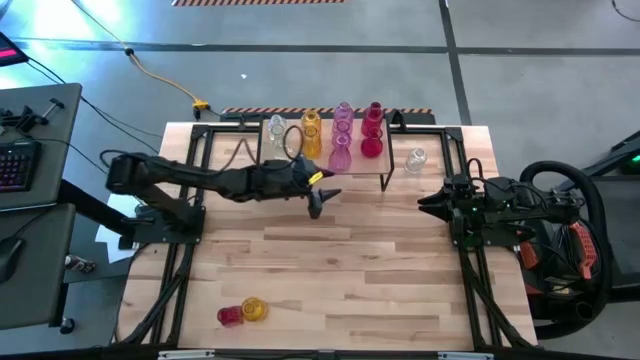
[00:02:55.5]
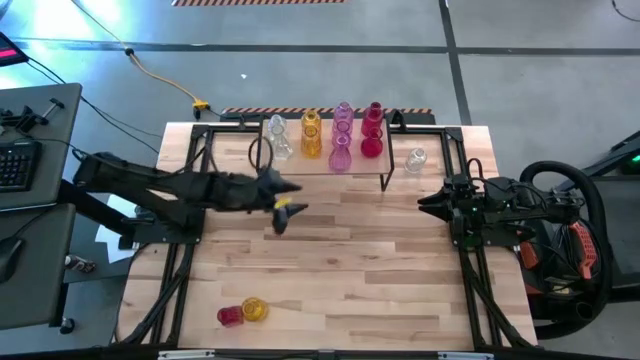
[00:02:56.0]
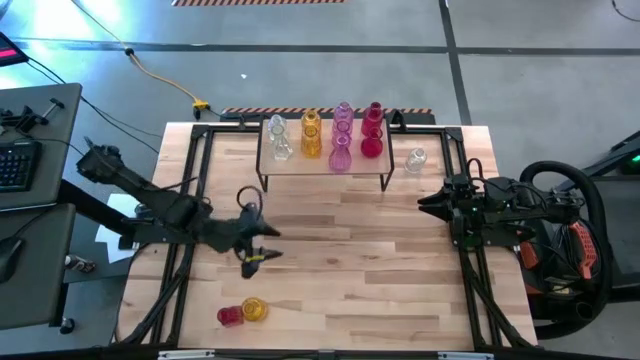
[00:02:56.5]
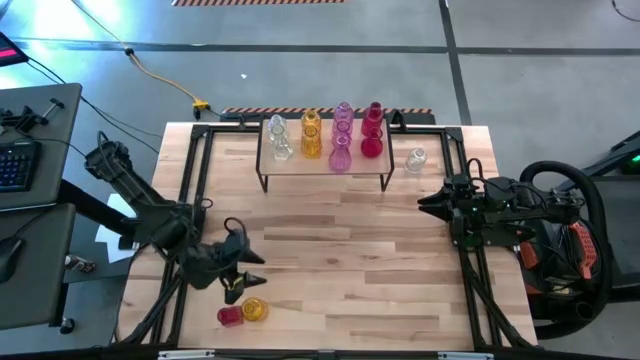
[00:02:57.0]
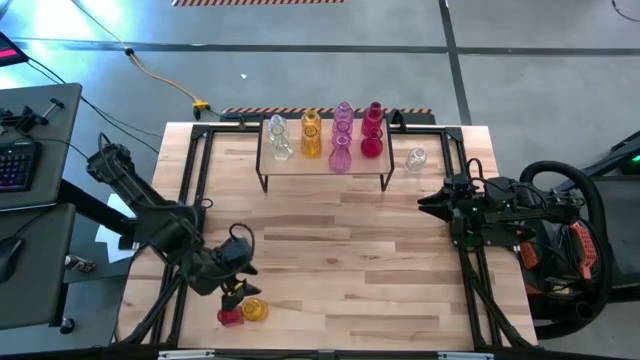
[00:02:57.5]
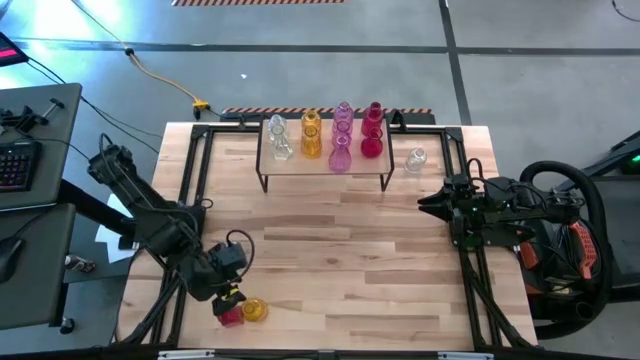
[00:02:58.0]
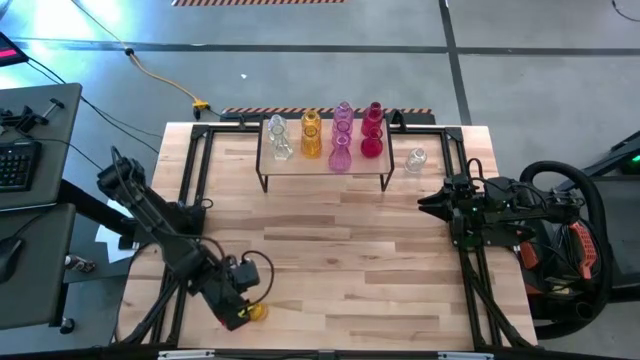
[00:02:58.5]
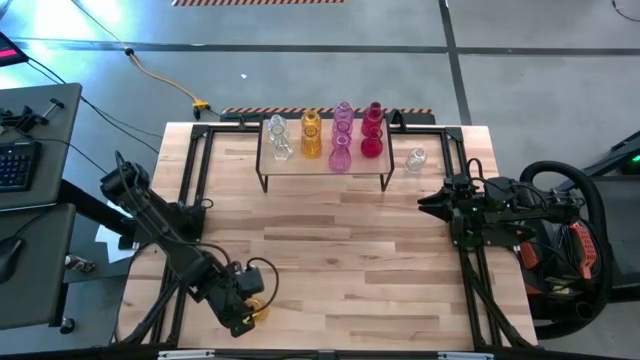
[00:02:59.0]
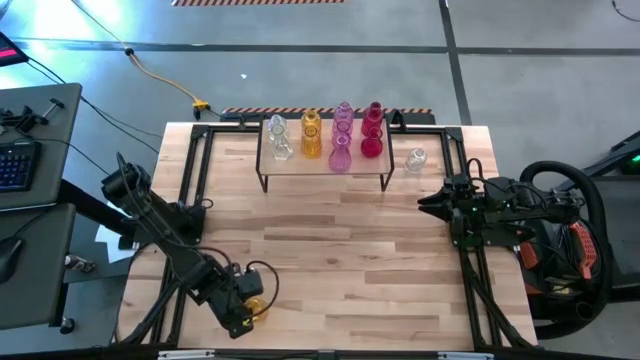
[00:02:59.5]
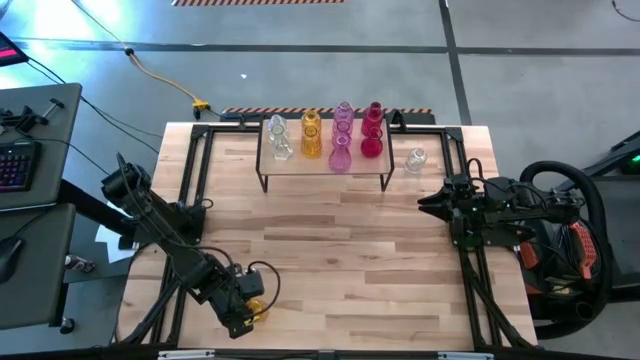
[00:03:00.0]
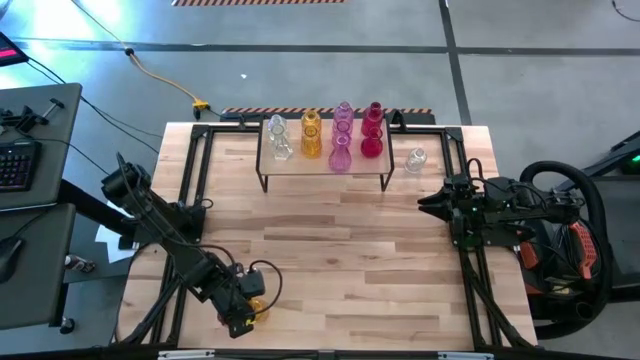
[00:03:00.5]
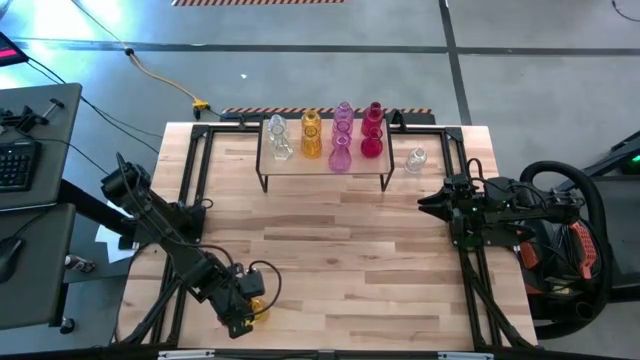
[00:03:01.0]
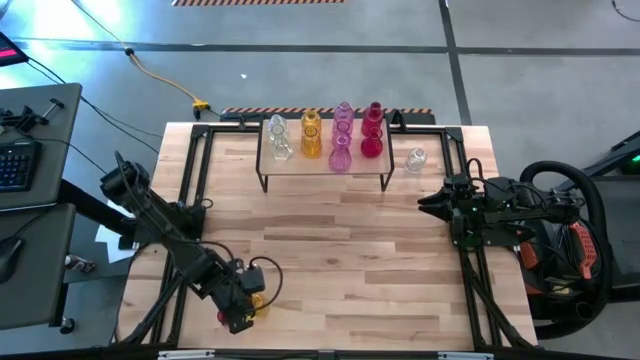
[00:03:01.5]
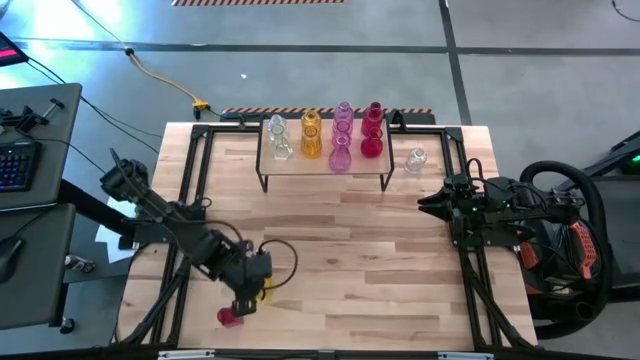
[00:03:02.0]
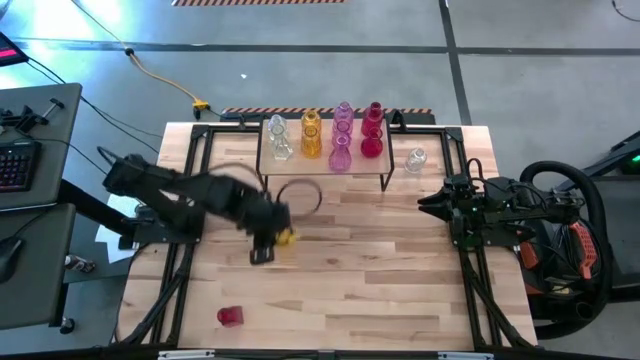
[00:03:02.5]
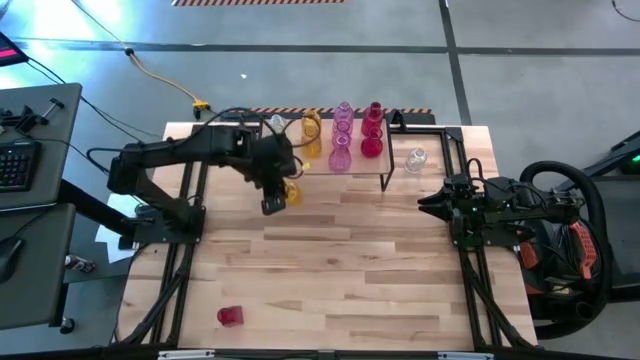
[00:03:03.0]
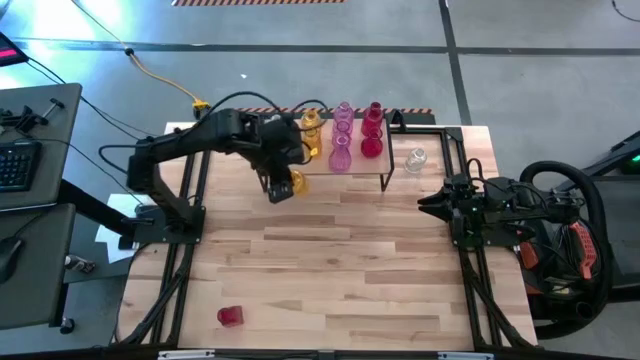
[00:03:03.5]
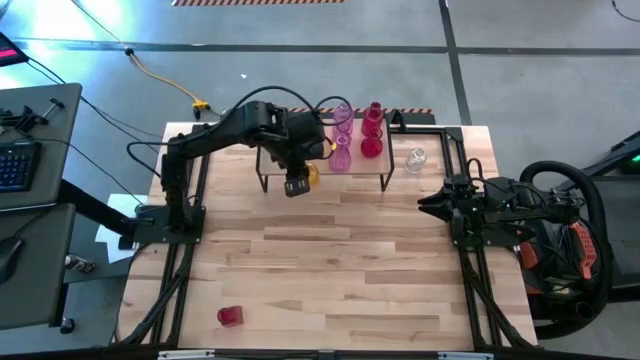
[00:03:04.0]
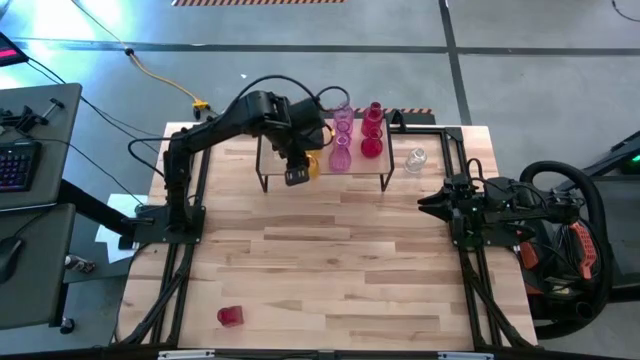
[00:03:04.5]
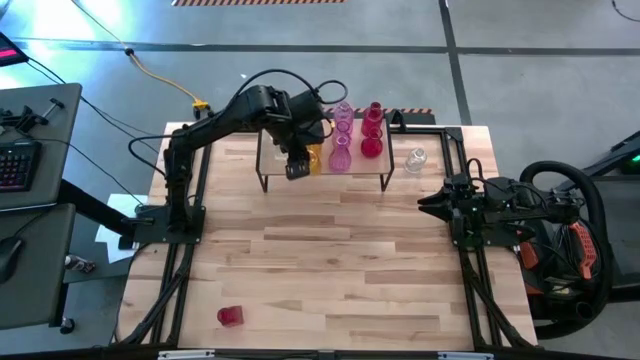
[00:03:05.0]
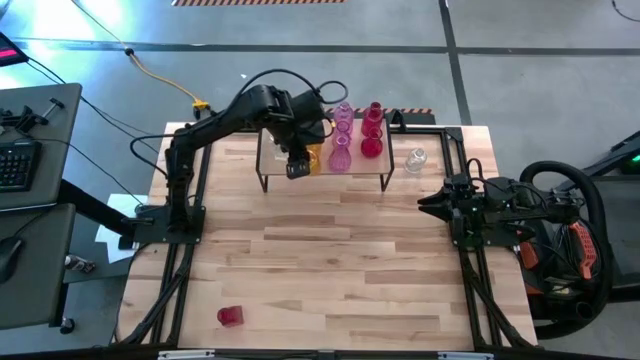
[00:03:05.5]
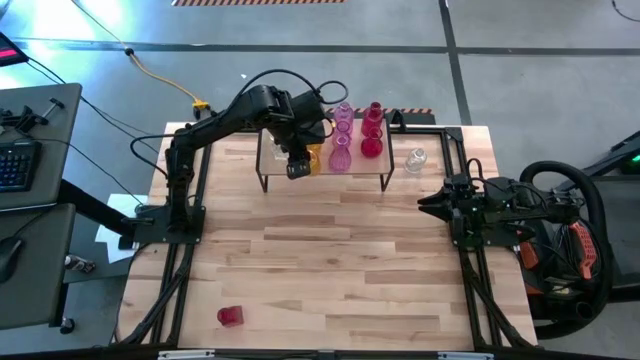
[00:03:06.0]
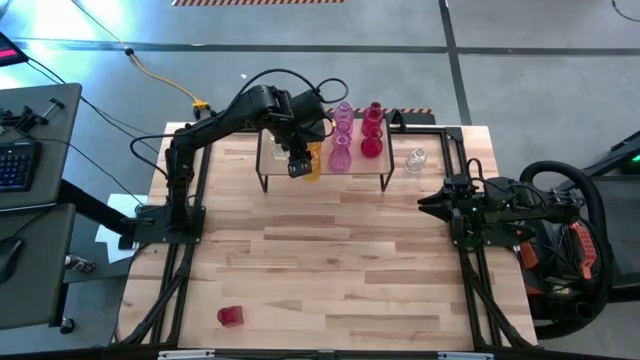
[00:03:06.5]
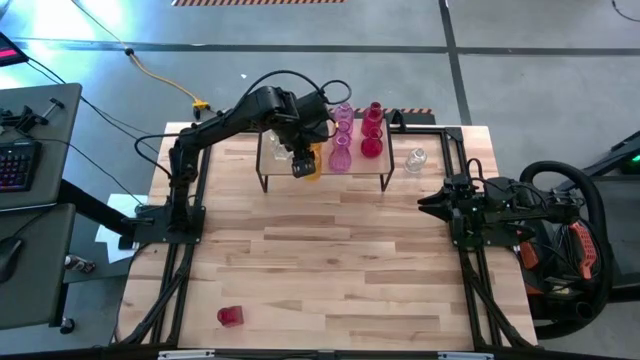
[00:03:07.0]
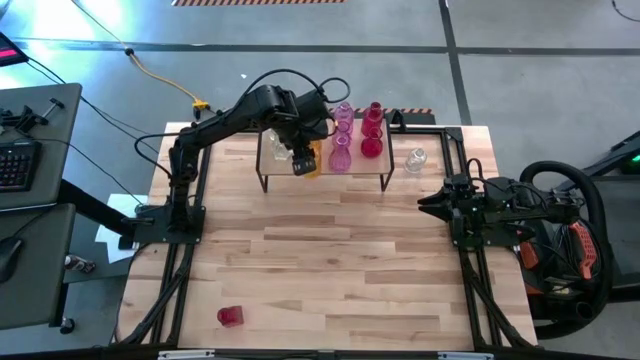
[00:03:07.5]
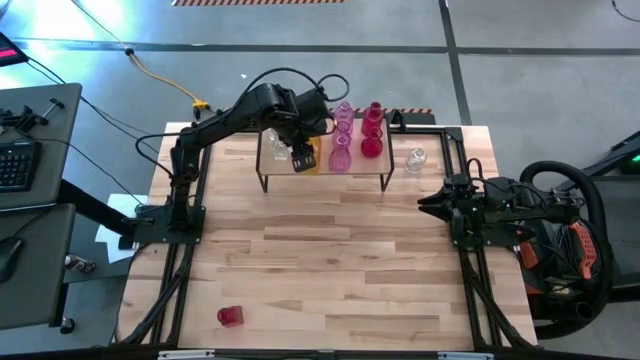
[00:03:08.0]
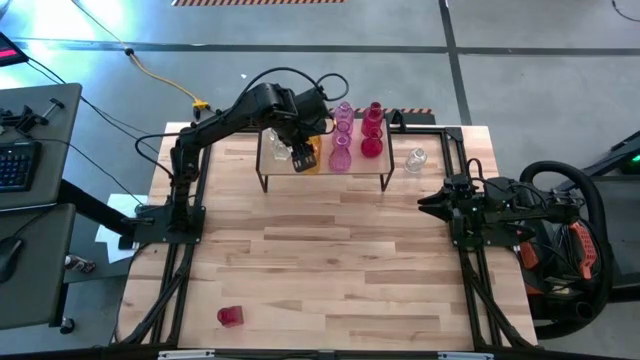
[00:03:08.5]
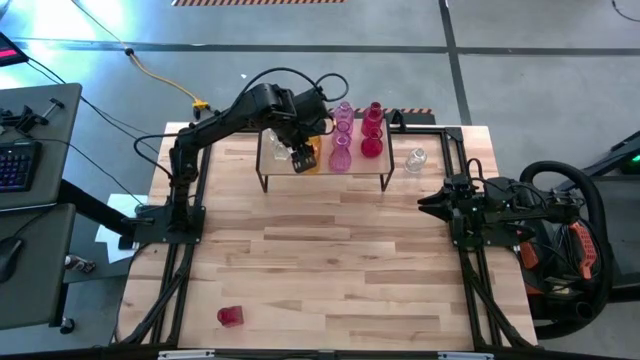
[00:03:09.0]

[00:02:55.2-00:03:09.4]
Task: sort vases onto shelf
Put the yellow vase aligned with the other yellow vases on the shelf

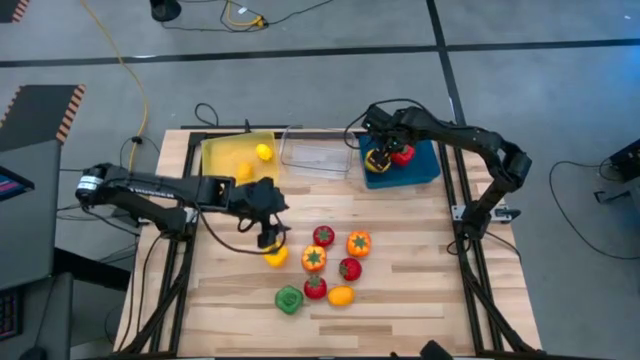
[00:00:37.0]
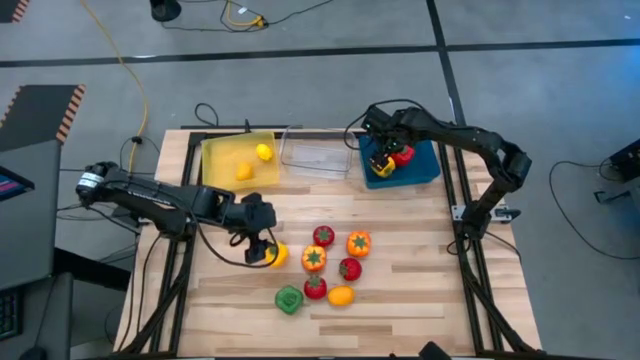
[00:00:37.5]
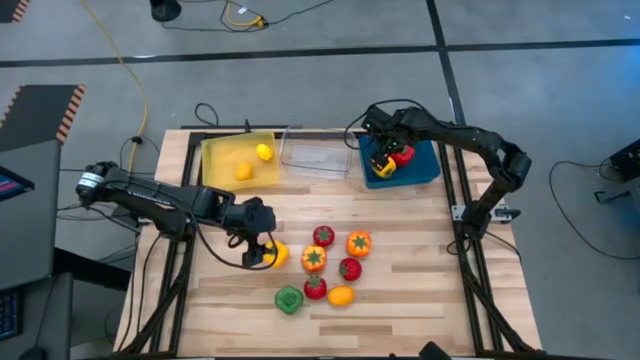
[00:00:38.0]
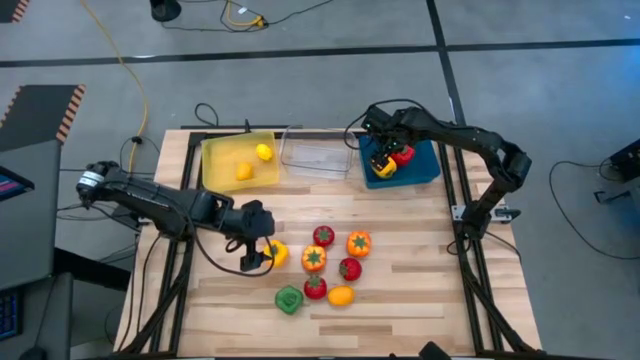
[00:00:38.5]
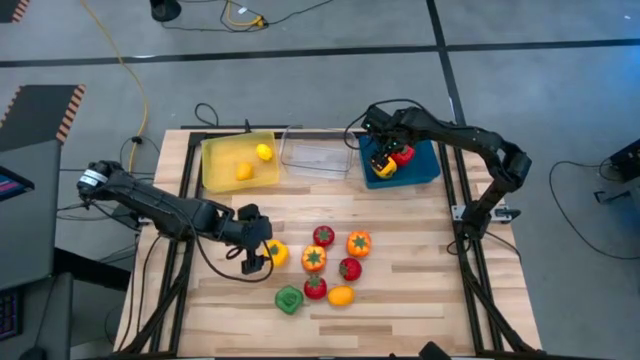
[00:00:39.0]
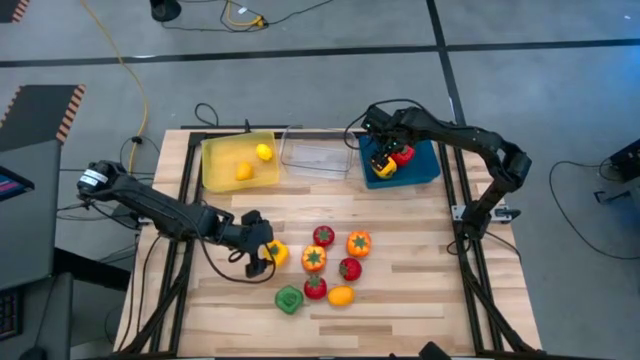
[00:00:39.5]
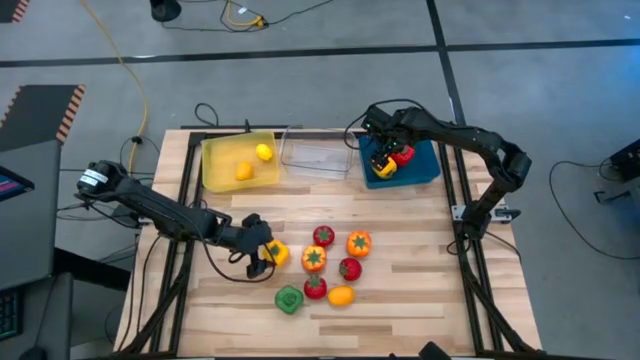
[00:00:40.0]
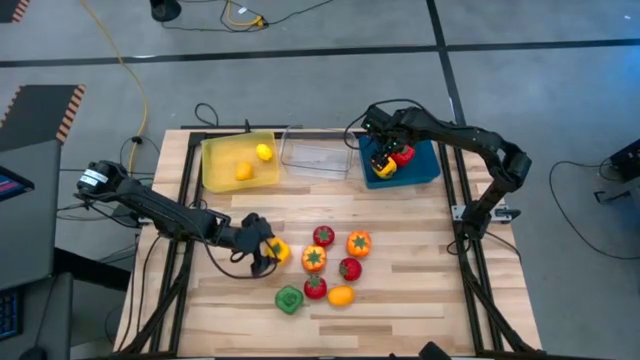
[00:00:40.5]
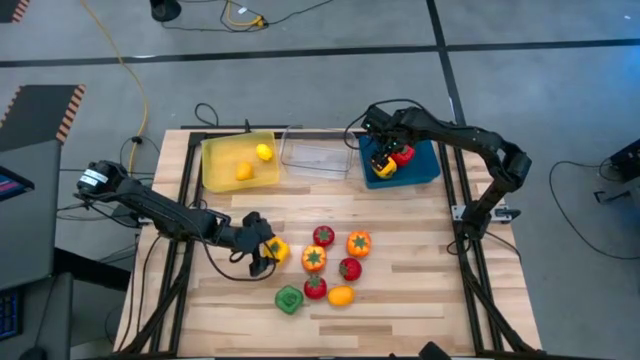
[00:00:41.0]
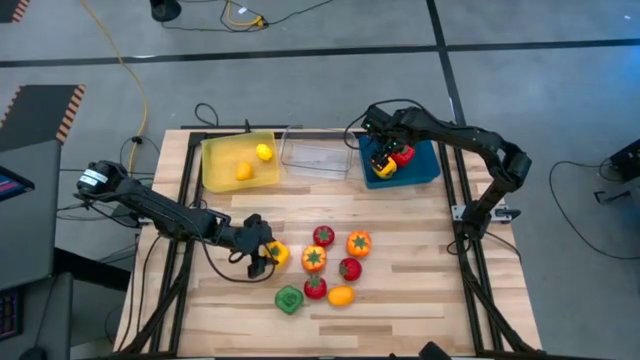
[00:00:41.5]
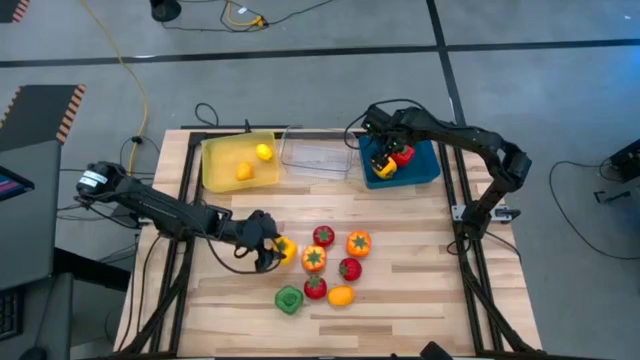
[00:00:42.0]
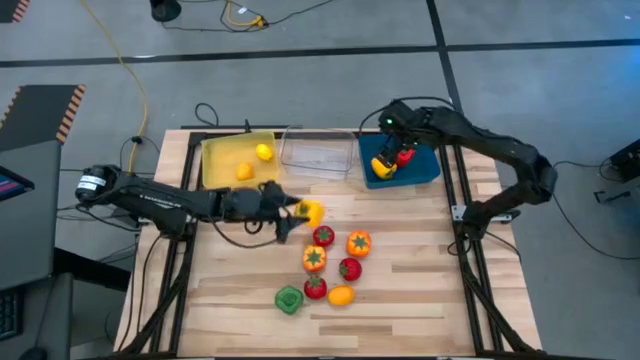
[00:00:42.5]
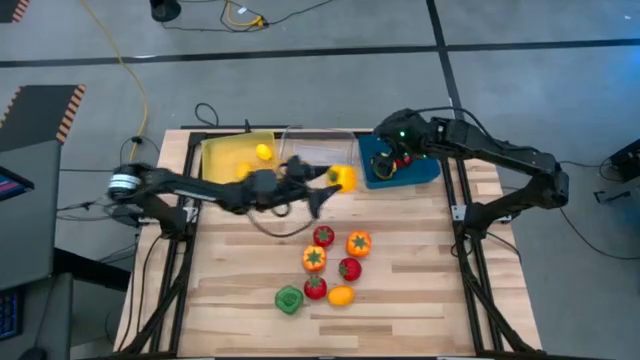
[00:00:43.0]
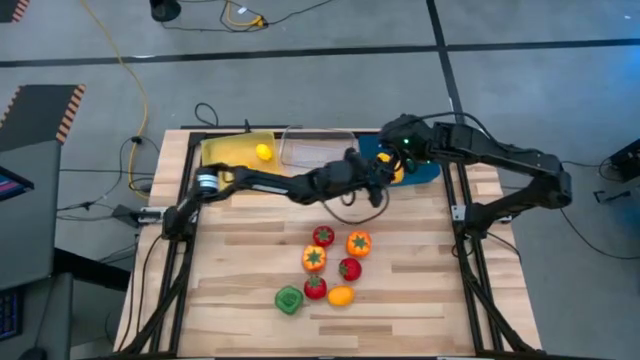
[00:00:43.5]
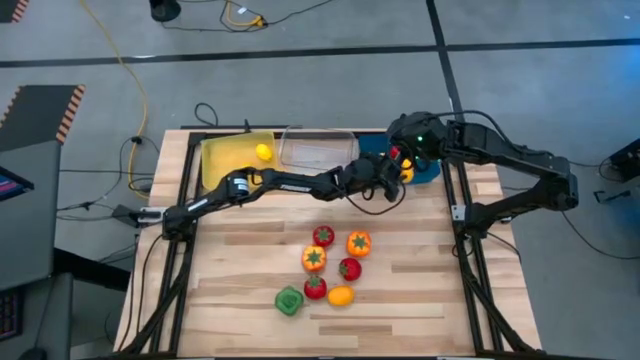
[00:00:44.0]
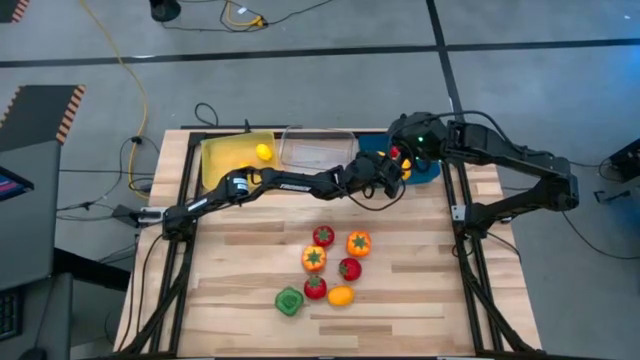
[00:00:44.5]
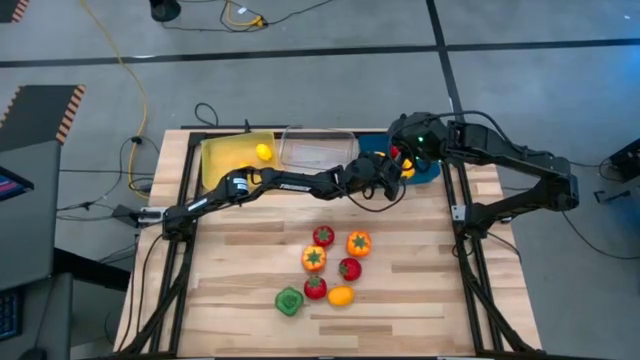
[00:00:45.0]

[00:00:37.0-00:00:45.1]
Task: Sort produce into baskets
Put the yellow bell pepper into the blue bin
